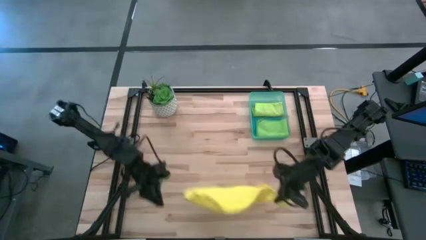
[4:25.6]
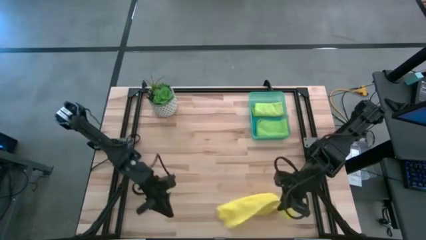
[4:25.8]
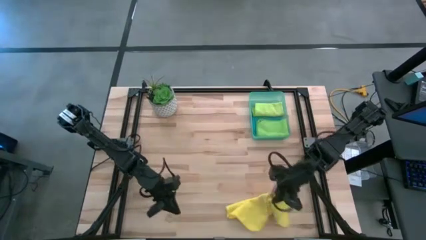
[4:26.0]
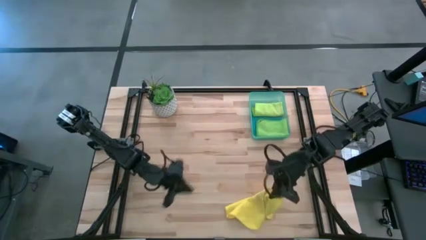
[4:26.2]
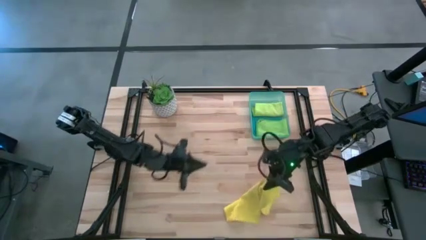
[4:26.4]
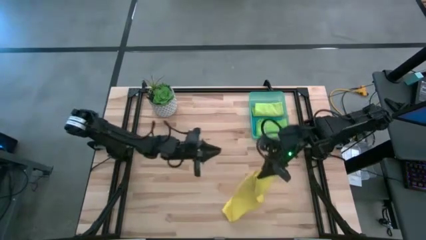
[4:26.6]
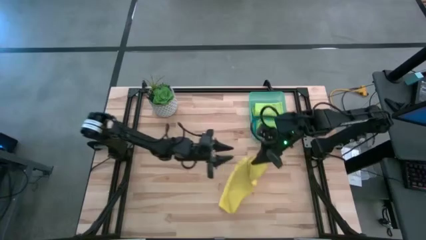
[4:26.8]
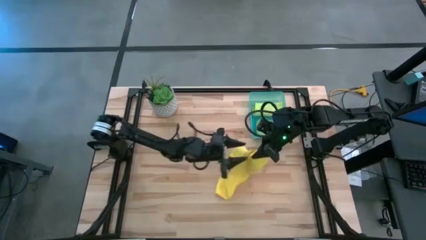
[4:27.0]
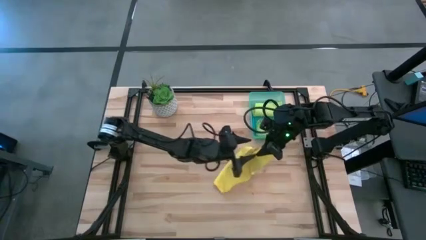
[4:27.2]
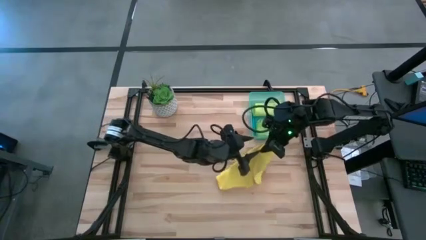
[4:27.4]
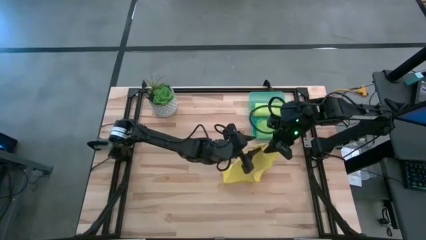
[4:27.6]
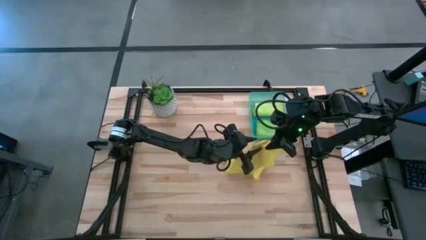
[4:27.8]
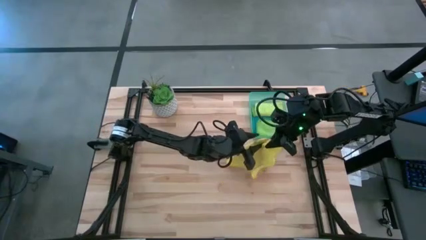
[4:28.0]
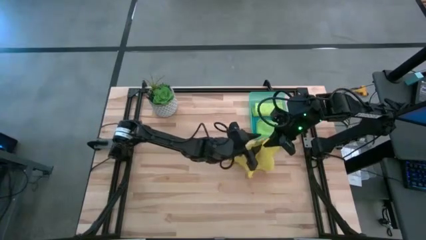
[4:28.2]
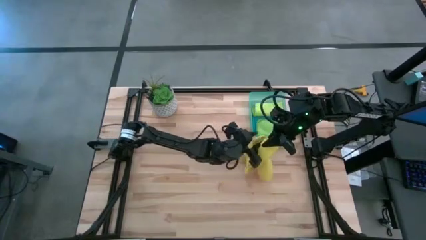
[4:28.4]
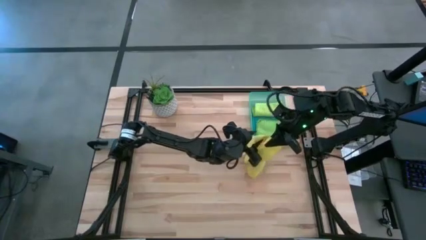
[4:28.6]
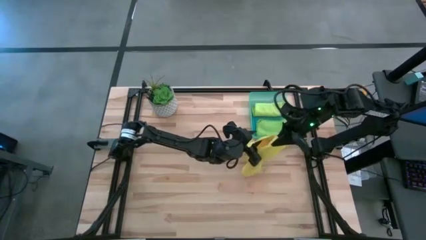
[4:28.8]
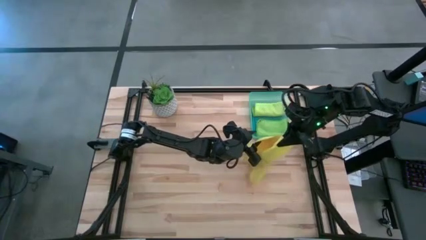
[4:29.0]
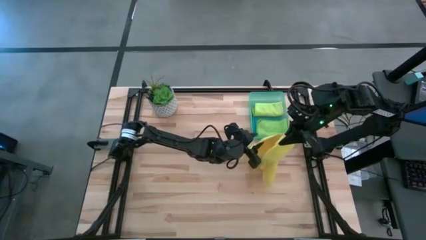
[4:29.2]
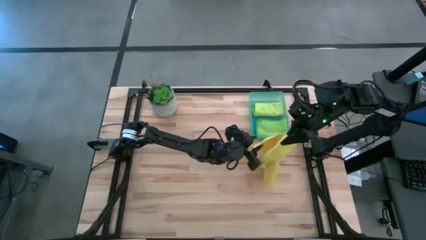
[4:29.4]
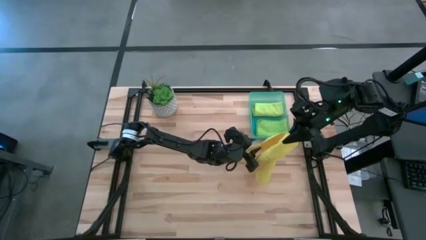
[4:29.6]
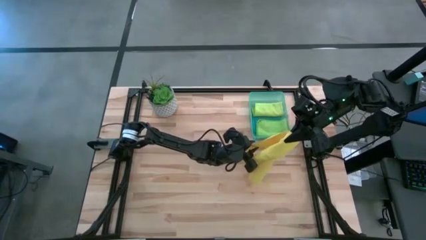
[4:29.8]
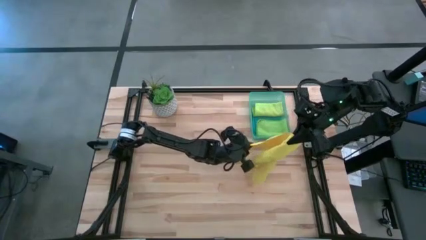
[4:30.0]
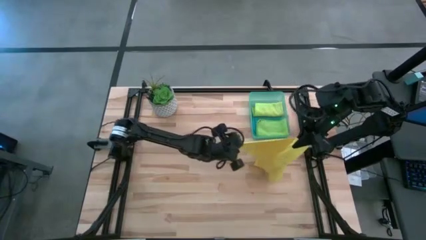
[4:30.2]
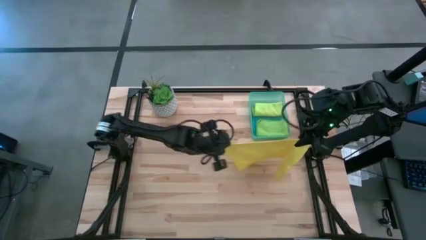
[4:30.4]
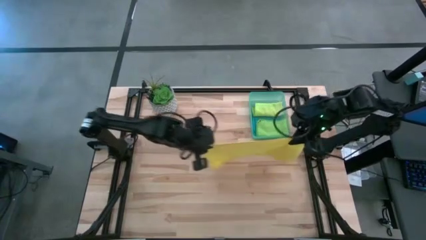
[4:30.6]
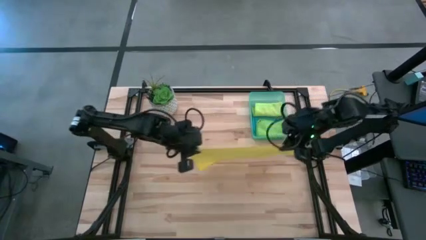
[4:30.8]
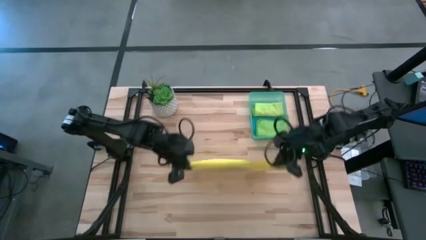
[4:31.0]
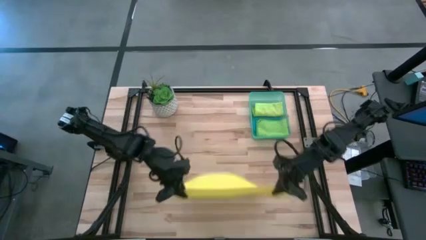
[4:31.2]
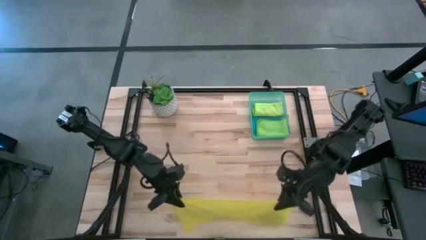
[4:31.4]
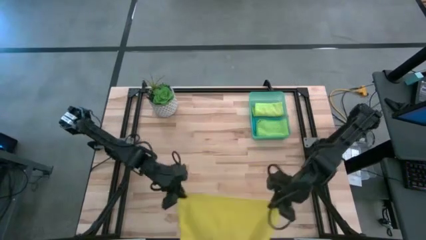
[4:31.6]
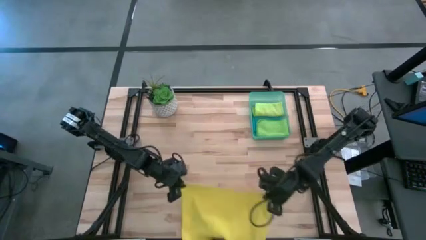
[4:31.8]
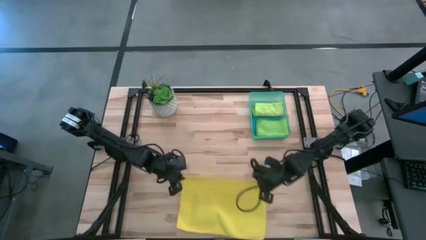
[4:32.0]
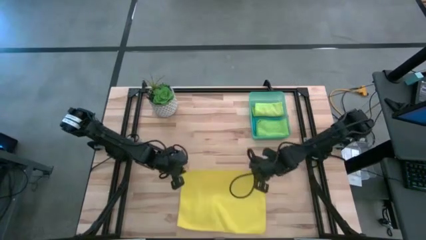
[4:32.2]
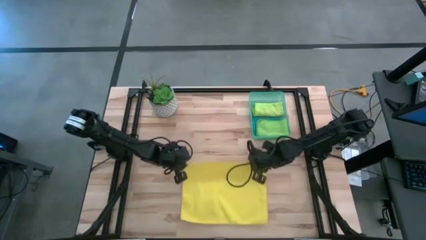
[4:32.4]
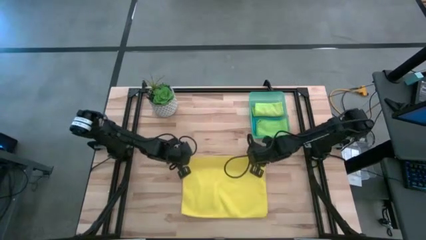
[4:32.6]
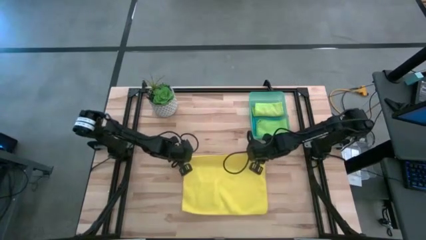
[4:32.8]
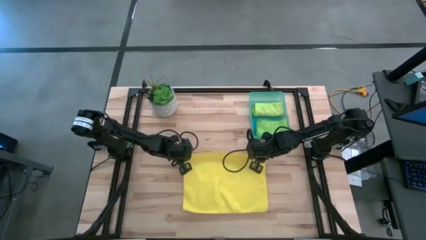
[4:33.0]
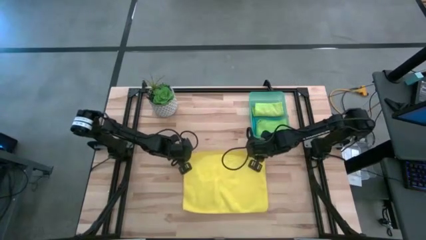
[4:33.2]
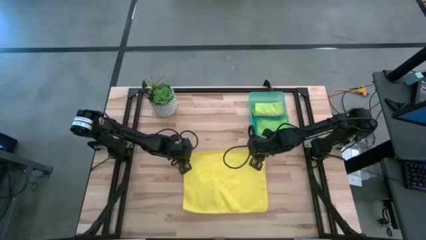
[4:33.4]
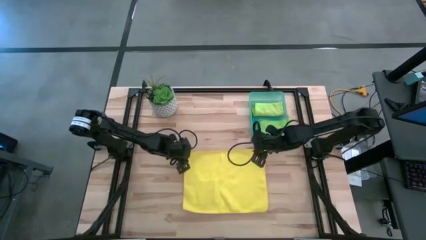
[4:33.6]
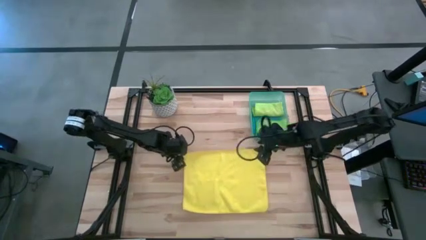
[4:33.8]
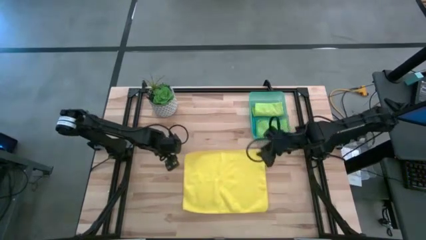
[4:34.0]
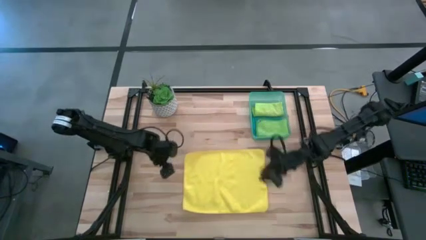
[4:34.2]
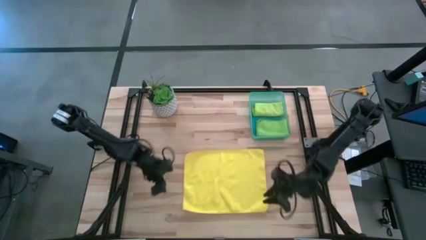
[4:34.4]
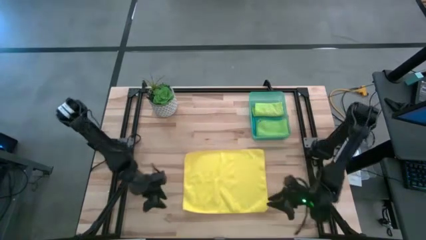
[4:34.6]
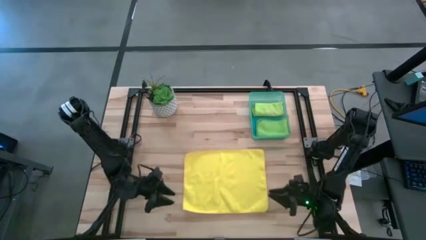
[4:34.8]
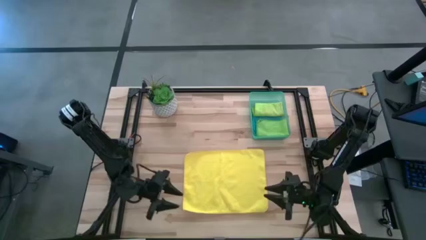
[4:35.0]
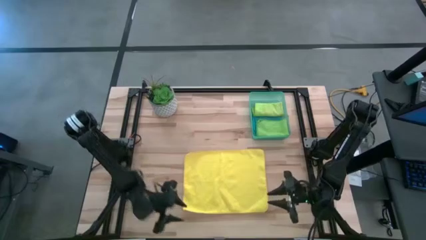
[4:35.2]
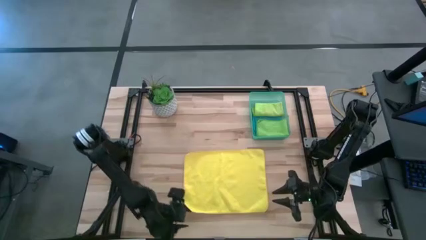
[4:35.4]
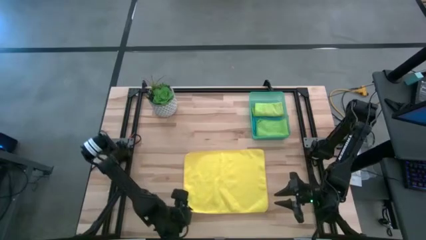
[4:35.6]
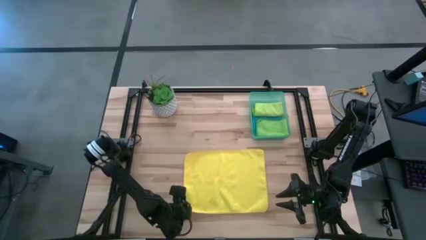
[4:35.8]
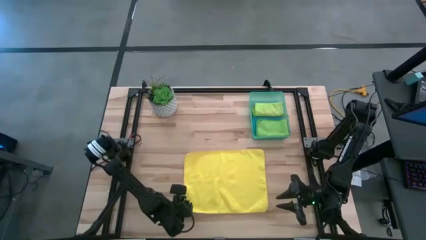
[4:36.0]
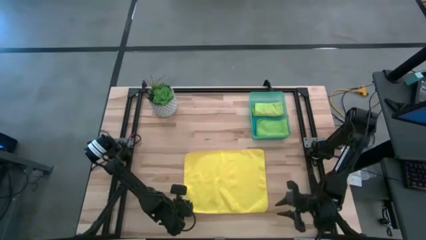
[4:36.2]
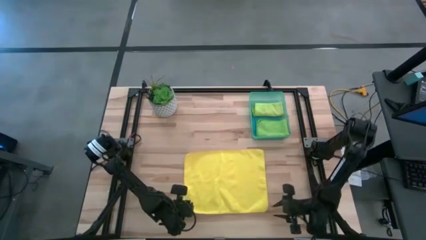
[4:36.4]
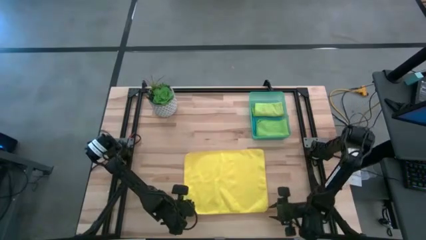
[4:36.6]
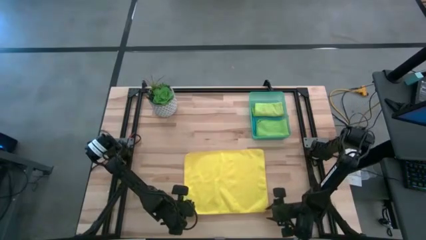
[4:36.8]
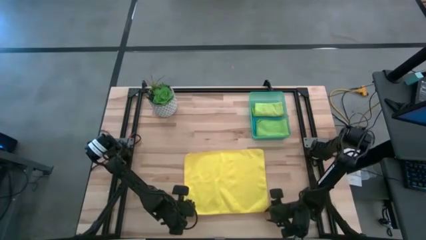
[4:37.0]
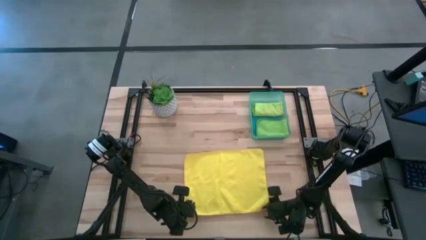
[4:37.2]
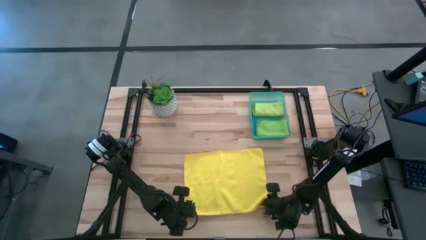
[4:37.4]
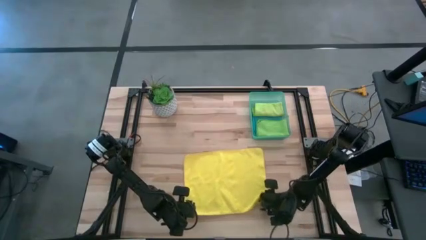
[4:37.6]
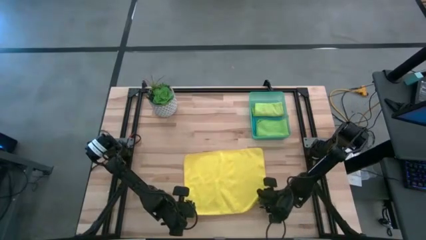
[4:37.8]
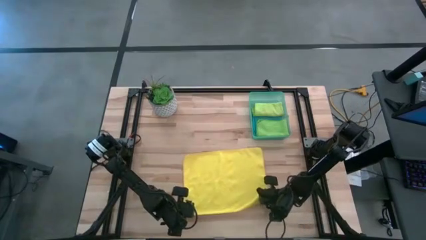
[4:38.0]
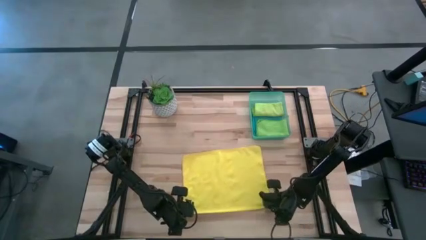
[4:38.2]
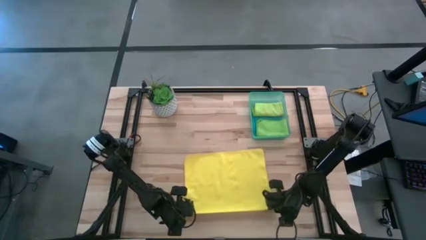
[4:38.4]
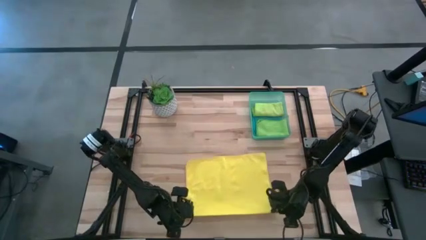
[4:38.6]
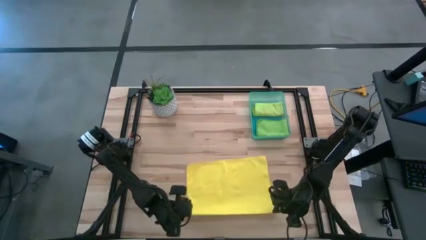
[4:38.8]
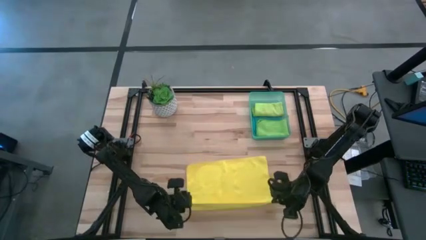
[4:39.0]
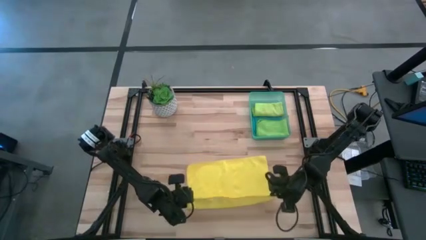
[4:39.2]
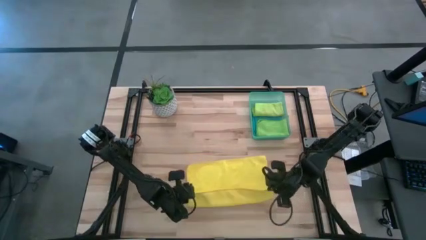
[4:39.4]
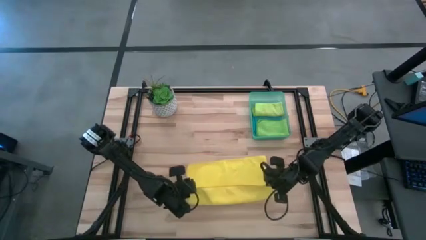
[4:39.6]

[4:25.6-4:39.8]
Task: Fold microfiber towels
Fold the yellow towel
